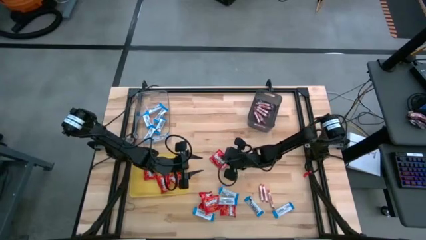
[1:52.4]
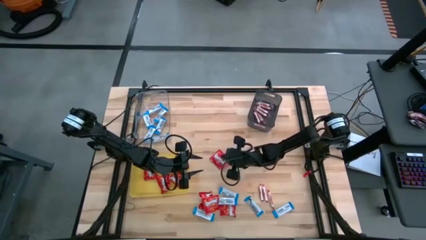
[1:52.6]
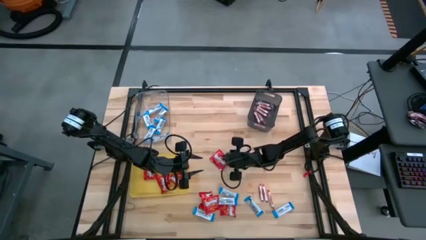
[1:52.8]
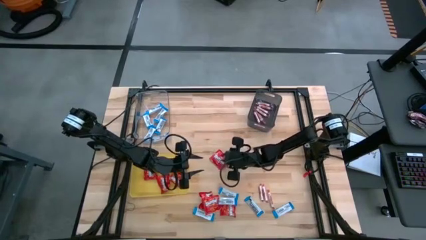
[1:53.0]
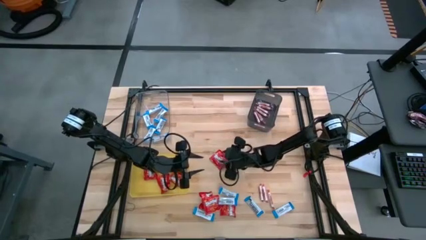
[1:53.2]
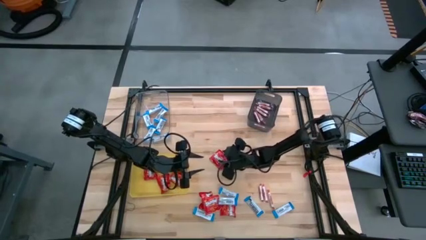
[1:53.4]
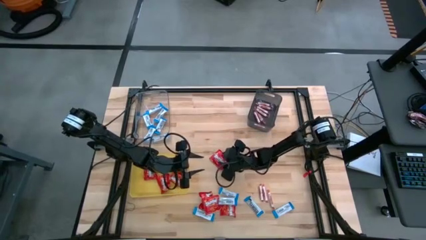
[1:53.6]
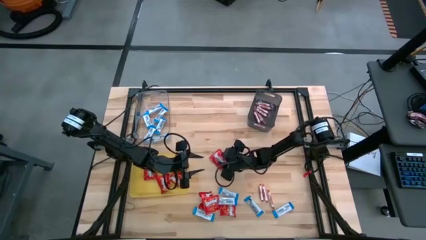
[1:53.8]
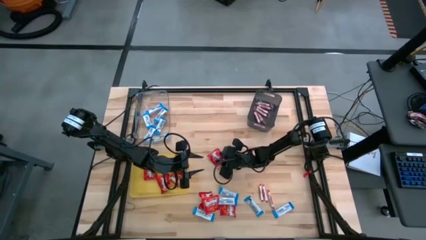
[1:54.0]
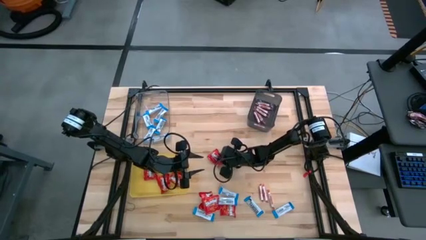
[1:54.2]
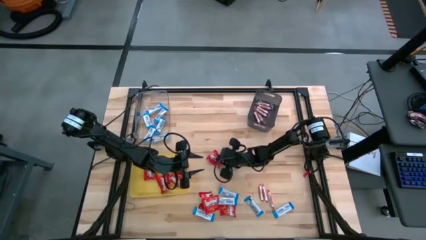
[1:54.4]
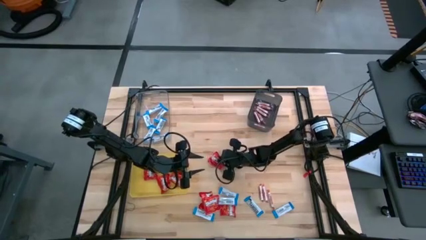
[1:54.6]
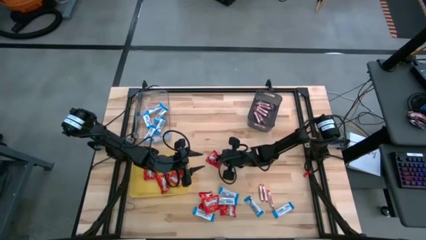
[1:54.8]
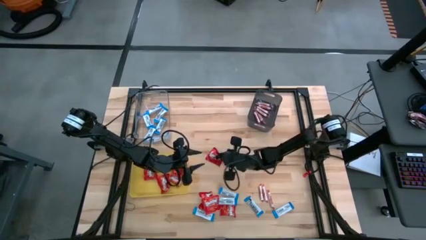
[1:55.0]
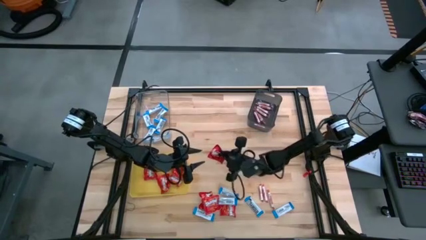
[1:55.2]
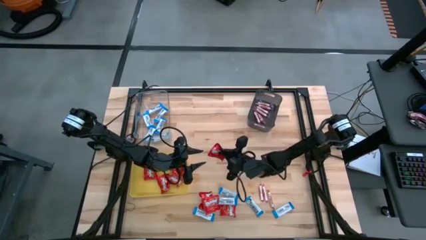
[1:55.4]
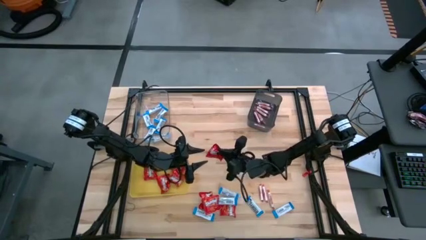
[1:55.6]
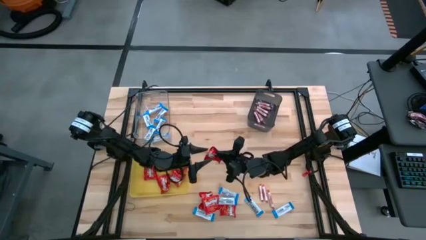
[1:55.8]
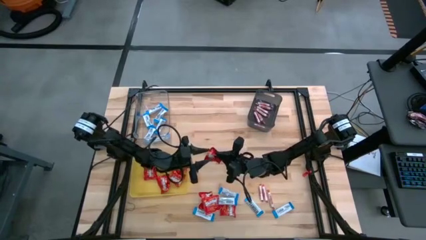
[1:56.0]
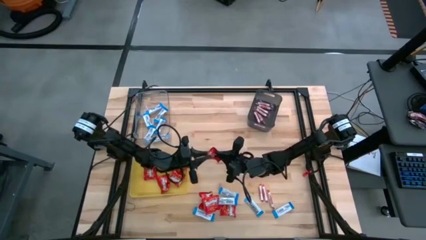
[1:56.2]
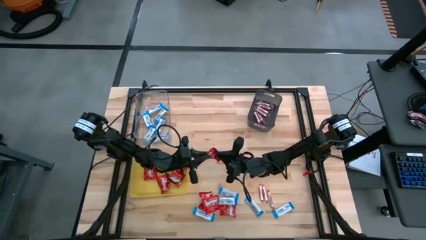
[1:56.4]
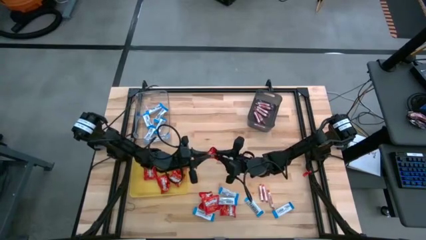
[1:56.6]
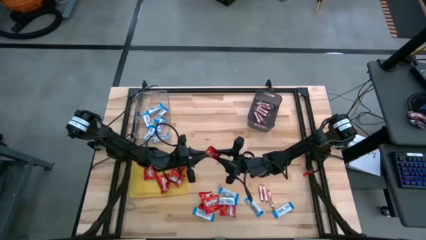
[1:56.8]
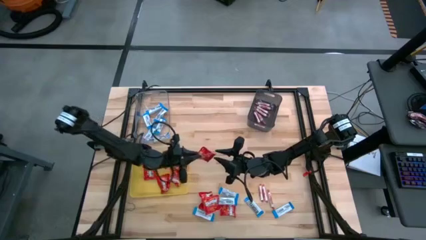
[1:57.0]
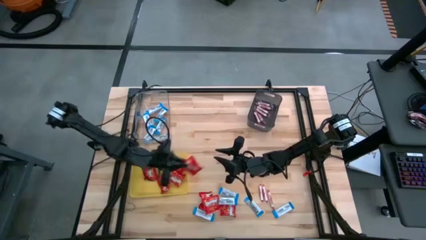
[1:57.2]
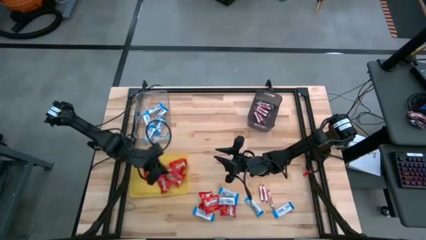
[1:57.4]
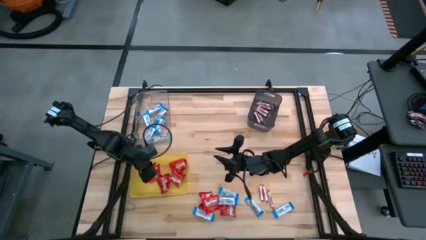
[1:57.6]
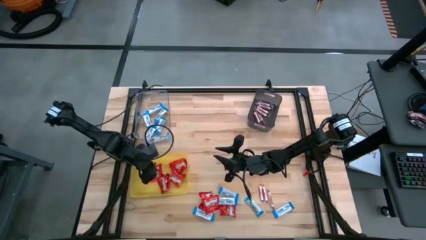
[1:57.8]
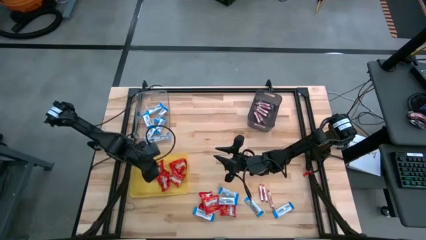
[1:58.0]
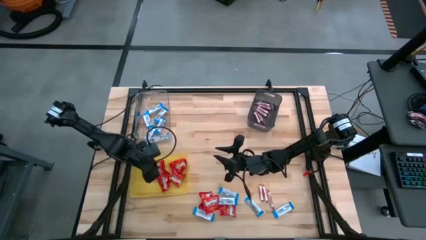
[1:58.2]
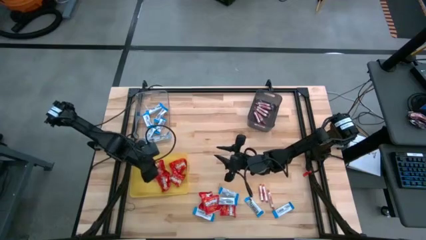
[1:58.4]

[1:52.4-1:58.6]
Task: Sort candy
Put the red chocolate into the yellow bin

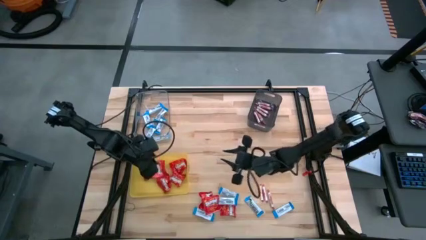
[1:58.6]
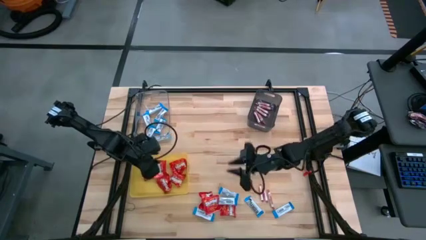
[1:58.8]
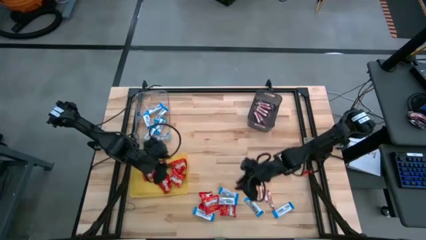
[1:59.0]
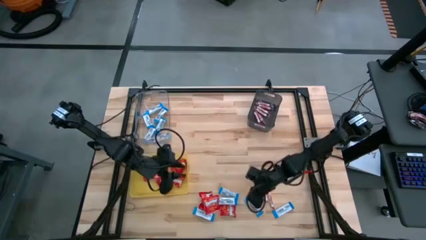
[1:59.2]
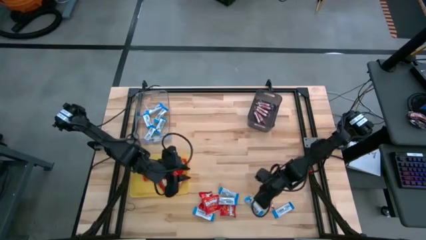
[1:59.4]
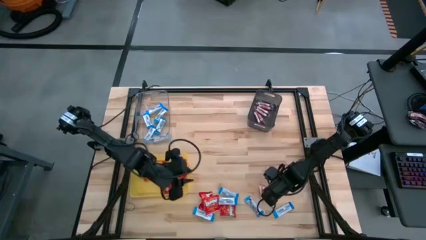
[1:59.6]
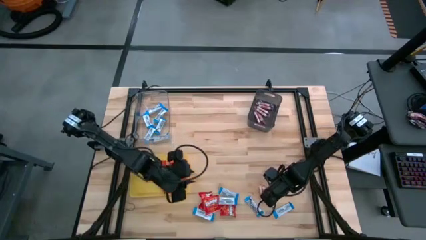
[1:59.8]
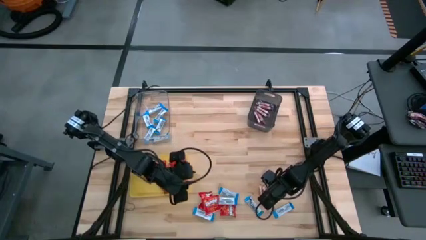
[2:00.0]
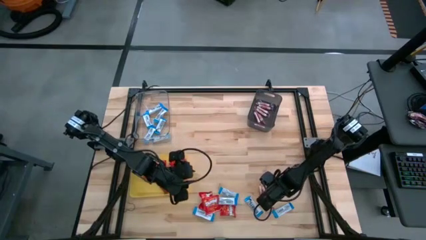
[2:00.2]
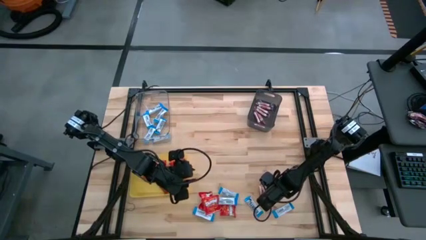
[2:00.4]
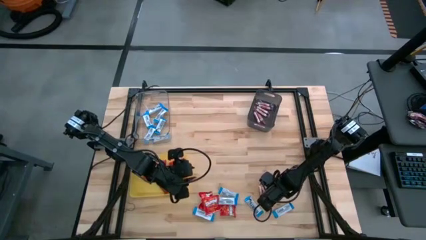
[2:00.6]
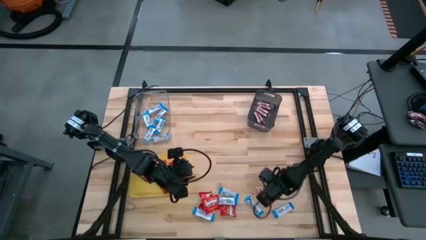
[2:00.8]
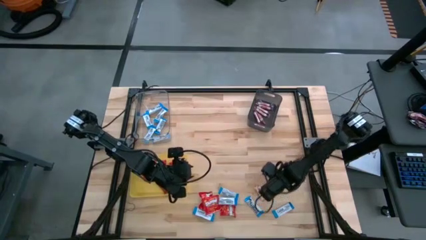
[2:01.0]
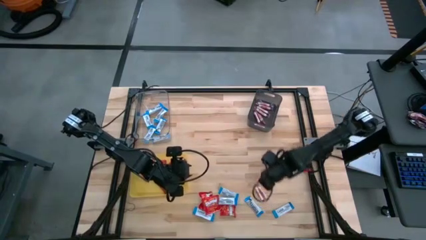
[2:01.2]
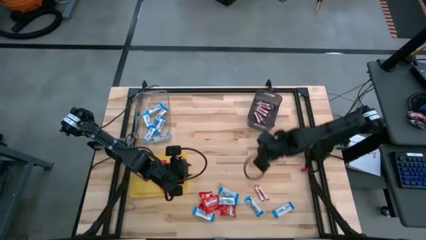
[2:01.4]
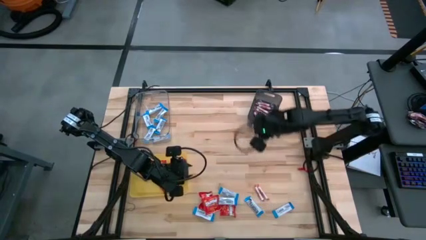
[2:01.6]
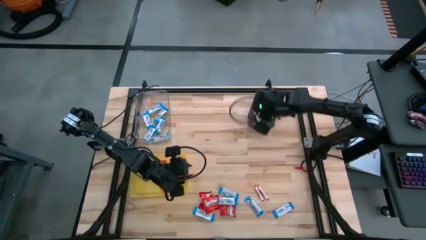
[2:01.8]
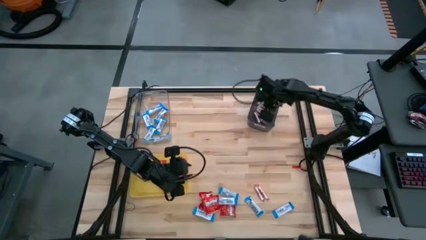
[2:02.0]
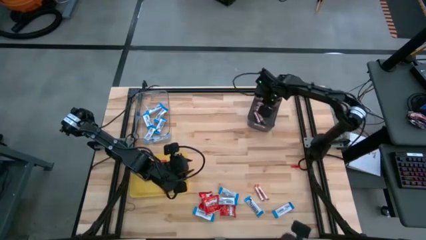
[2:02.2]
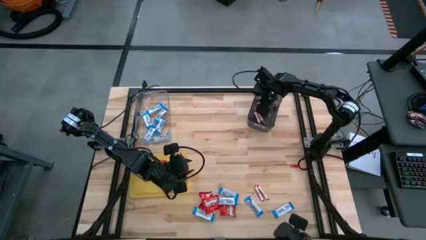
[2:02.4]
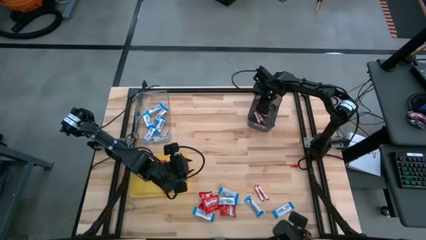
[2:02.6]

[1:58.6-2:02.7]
Put the white candy into the black bin

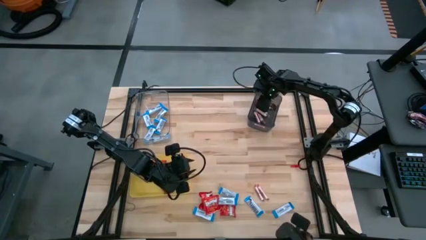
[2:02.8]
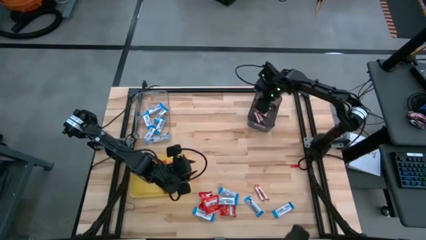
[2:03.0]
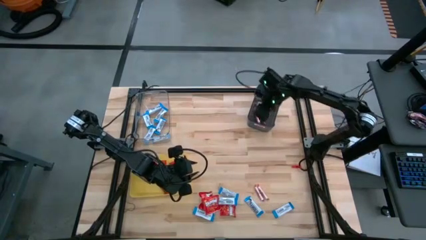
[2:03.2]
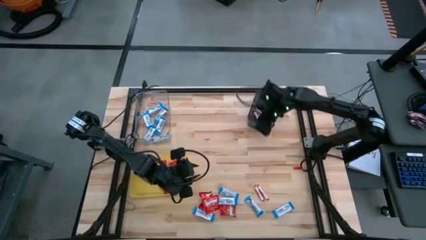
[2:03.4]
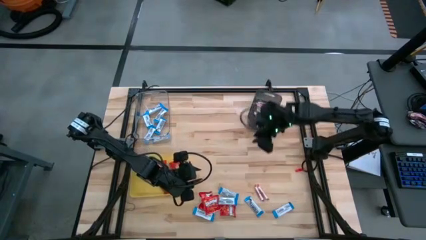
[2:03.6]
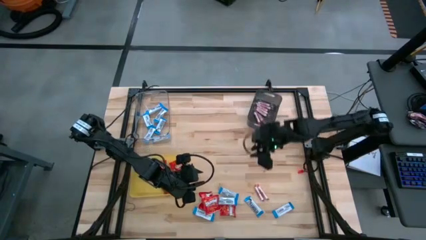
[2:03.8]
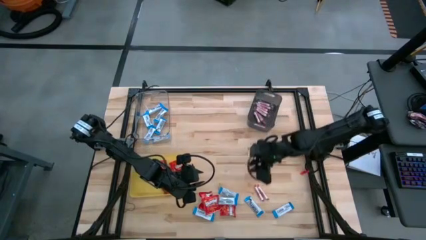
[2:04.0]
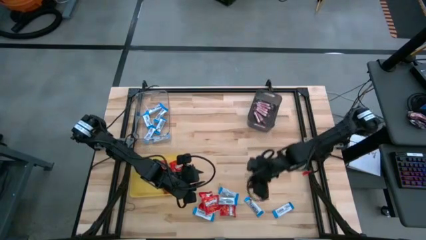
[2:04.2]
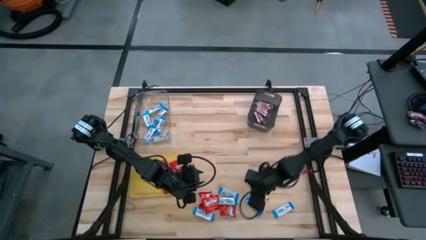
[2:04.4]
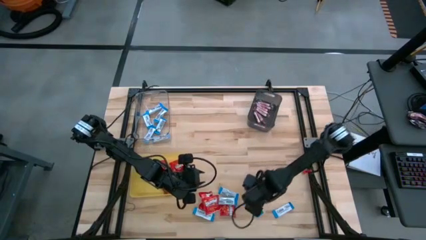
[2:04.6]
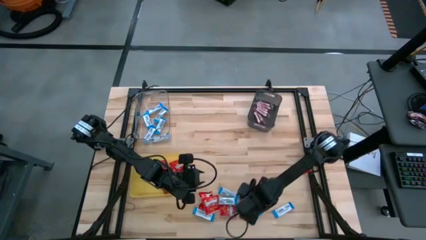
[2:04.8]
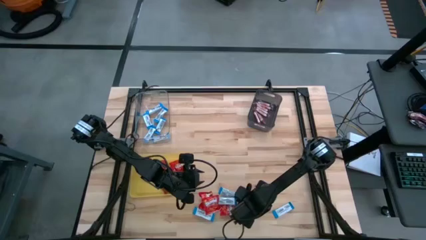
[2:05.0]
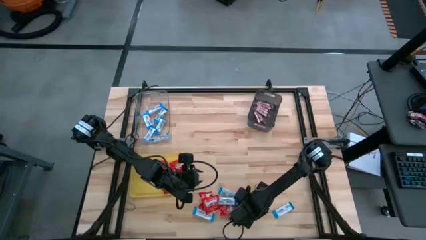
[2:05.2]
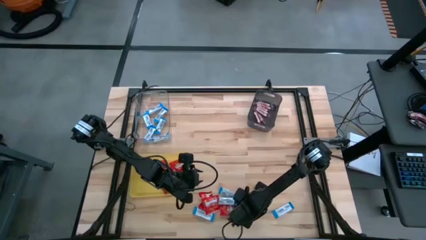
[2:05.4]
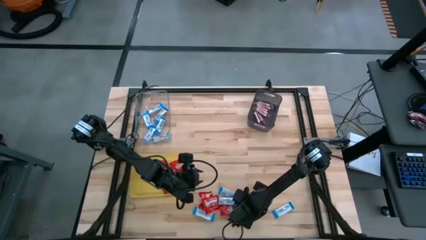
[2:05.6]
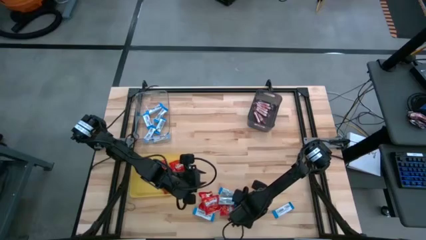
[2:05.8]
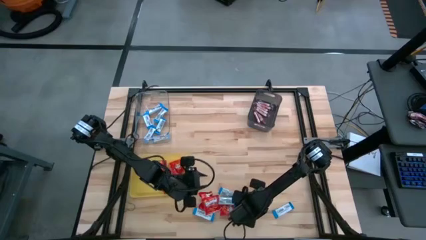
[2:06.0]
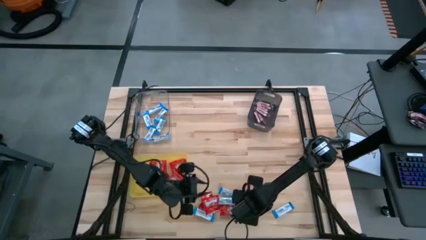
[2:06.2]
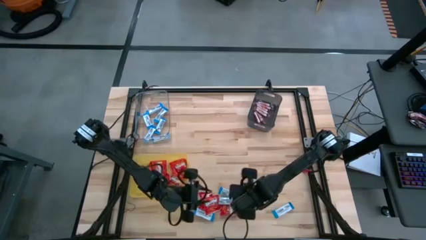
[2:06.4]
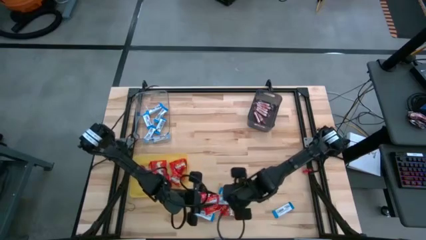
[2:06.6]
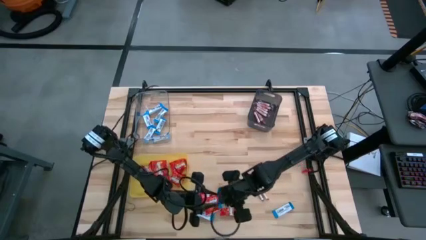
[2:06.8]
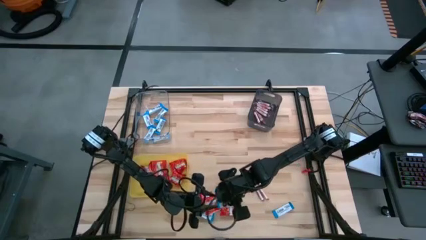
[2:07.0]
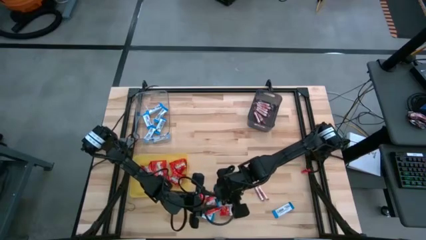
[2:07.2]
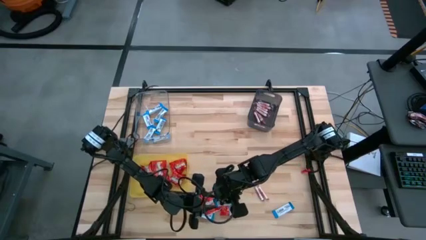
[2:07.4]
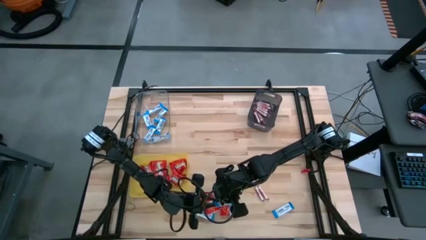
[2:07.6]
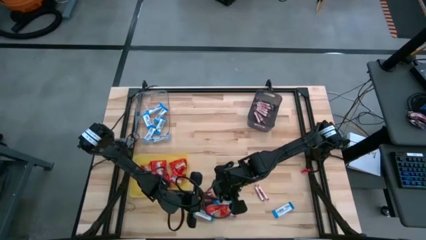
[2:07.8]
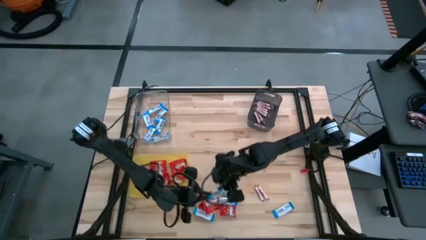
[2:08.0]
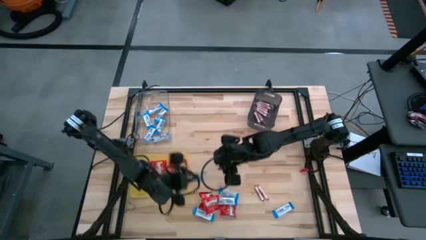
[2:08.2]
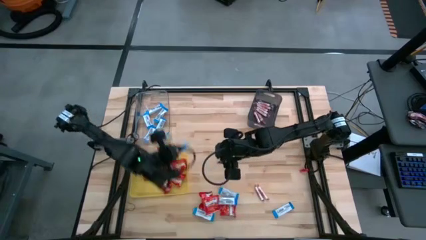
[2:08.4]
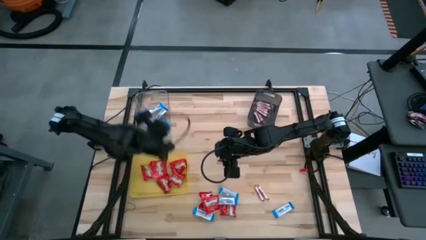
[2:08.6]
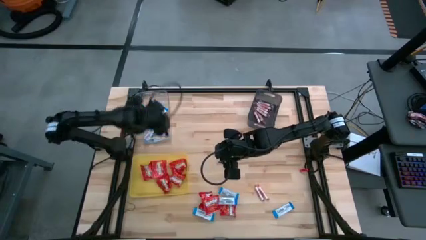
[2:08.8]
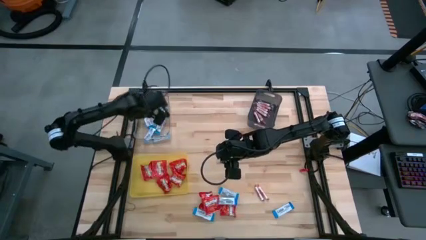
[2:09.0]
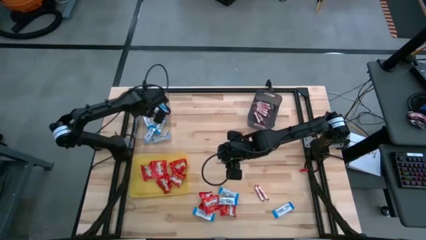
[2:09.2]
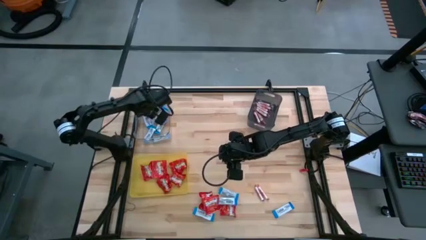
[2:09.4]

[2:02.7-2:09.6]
Put the blue chocolate into the transparent bin
